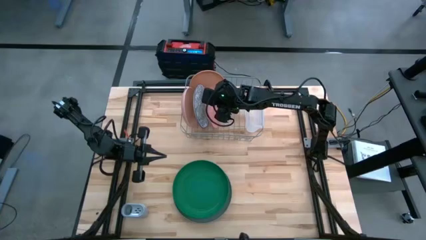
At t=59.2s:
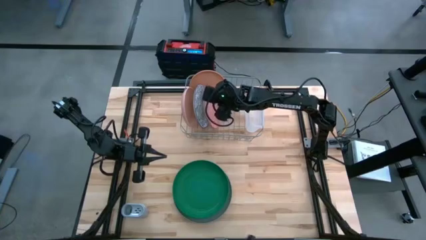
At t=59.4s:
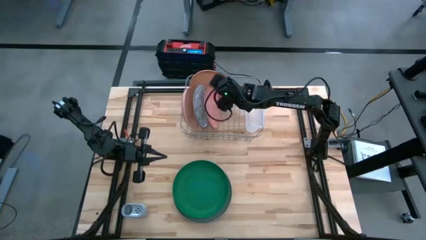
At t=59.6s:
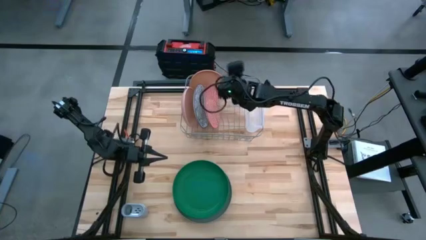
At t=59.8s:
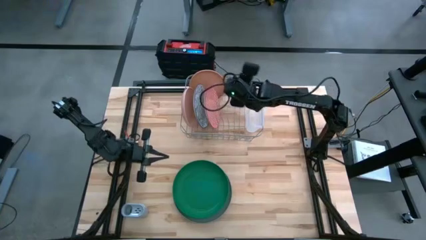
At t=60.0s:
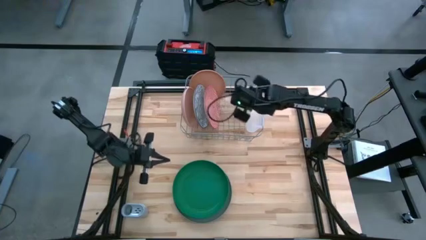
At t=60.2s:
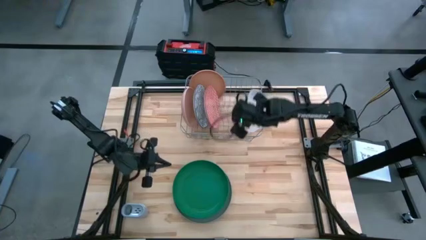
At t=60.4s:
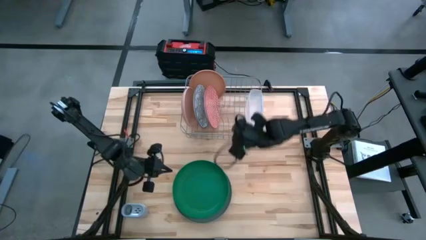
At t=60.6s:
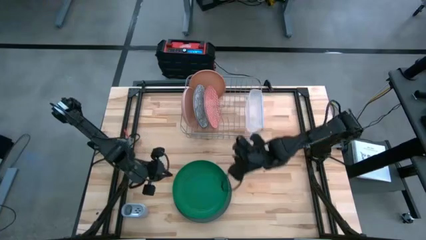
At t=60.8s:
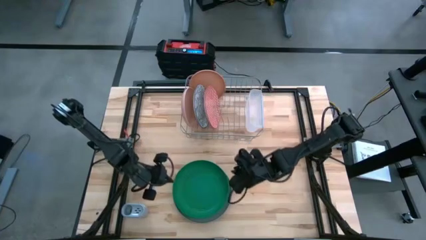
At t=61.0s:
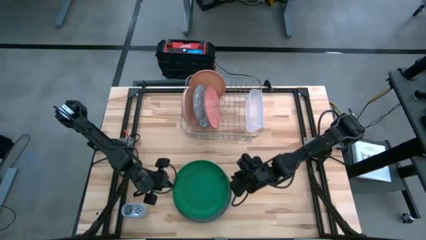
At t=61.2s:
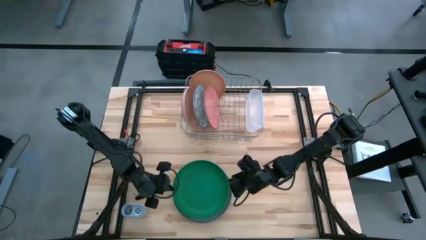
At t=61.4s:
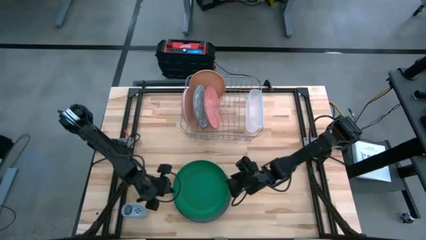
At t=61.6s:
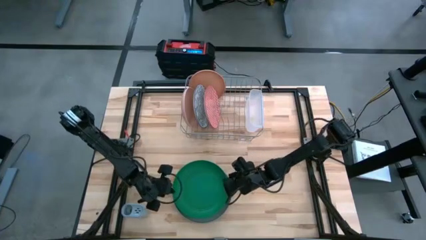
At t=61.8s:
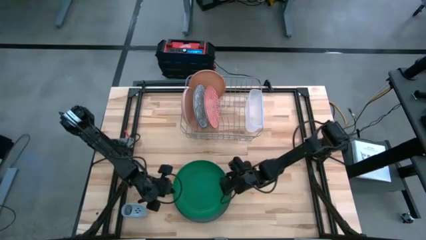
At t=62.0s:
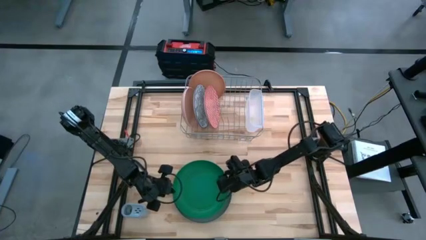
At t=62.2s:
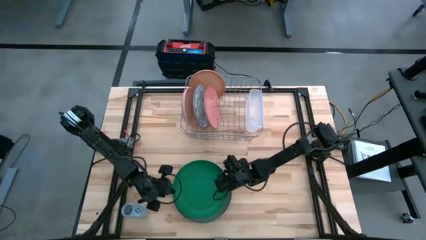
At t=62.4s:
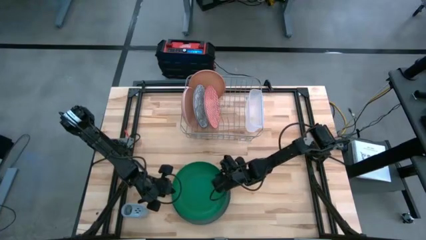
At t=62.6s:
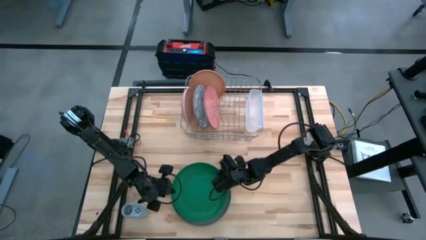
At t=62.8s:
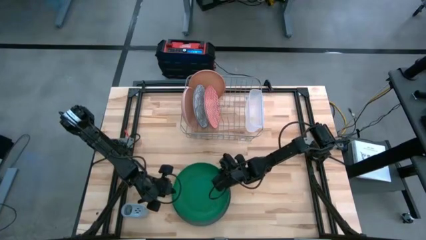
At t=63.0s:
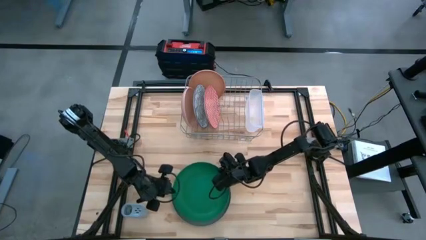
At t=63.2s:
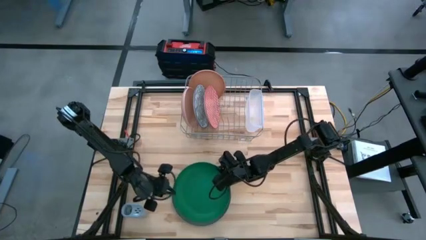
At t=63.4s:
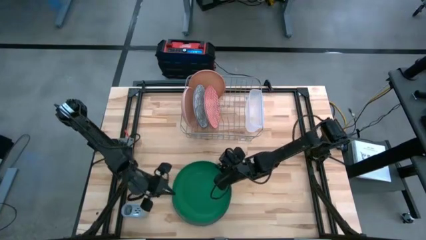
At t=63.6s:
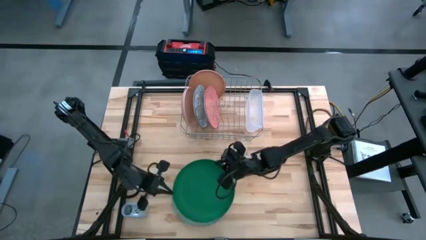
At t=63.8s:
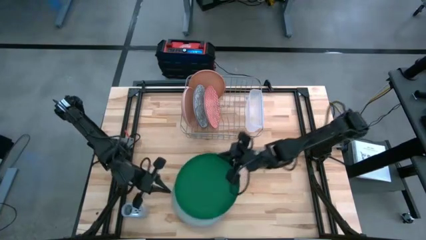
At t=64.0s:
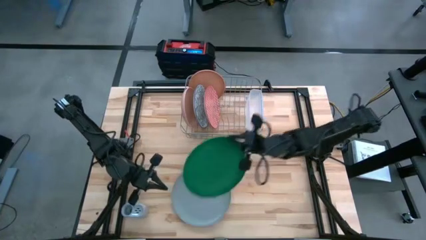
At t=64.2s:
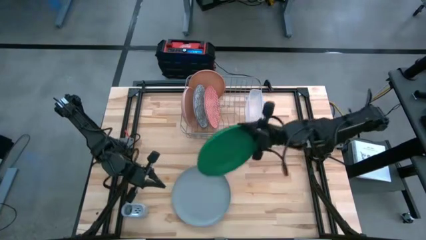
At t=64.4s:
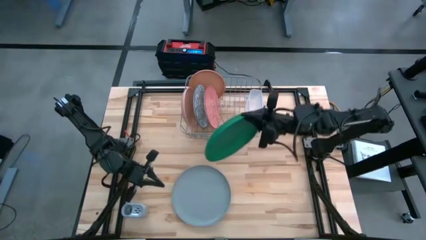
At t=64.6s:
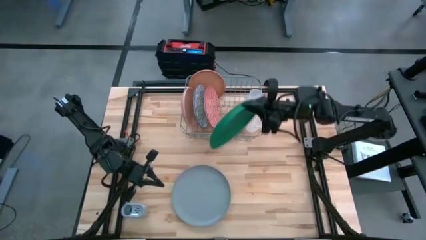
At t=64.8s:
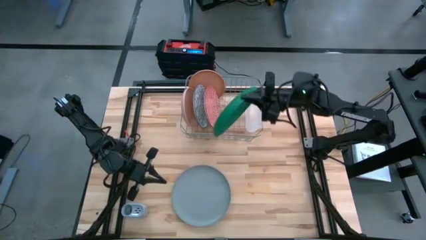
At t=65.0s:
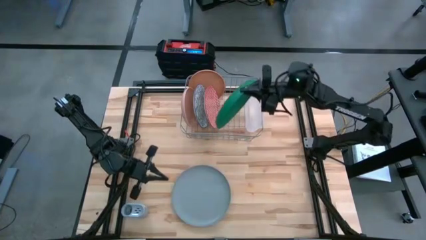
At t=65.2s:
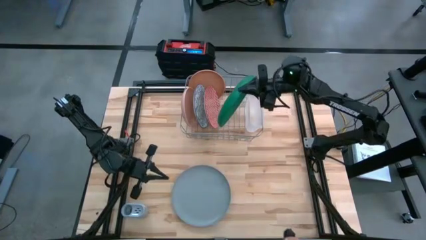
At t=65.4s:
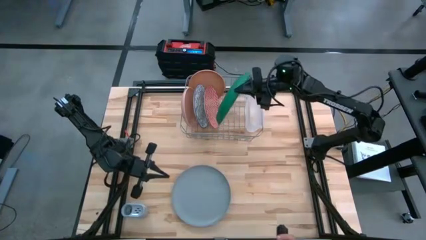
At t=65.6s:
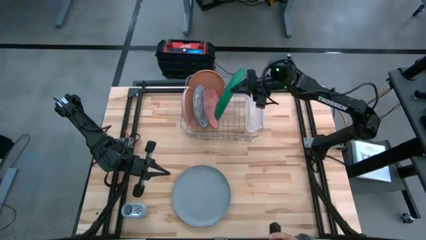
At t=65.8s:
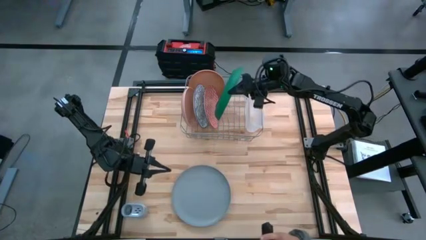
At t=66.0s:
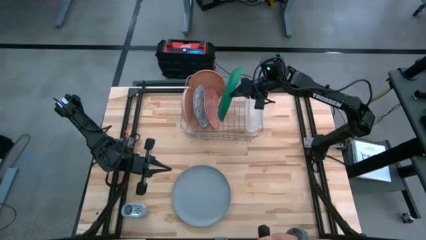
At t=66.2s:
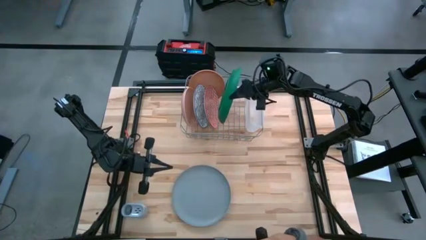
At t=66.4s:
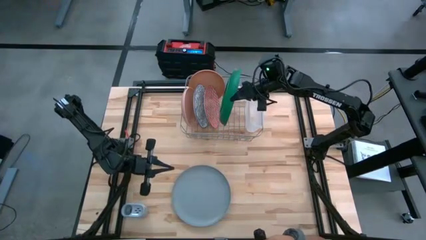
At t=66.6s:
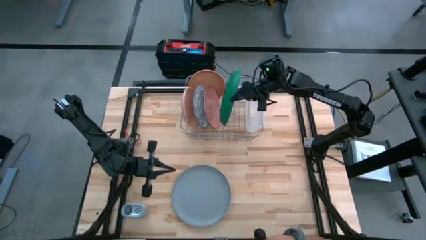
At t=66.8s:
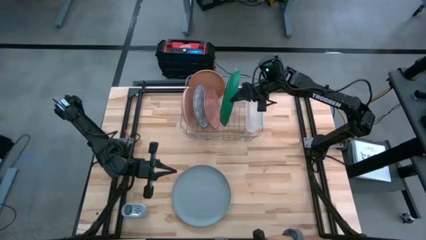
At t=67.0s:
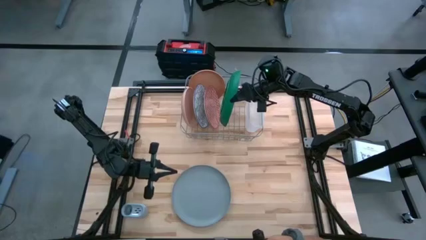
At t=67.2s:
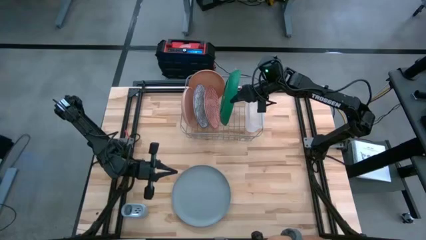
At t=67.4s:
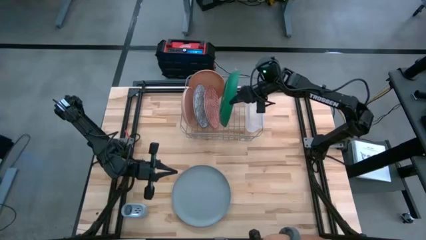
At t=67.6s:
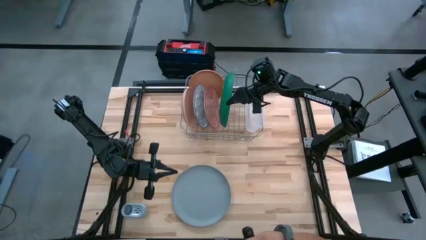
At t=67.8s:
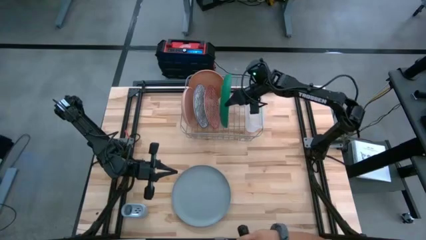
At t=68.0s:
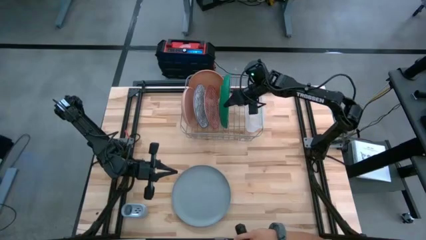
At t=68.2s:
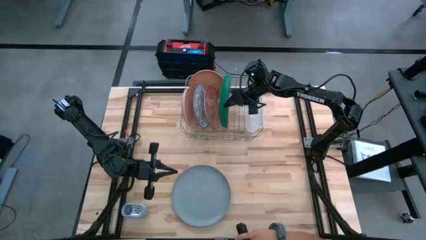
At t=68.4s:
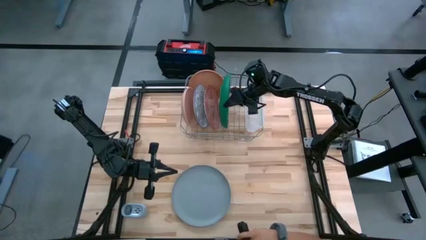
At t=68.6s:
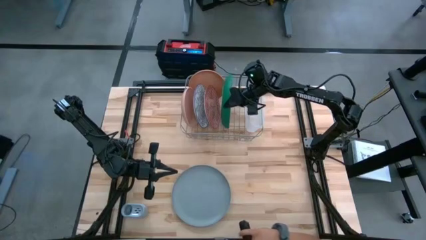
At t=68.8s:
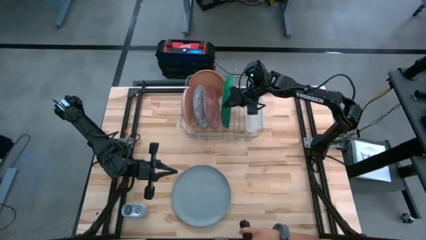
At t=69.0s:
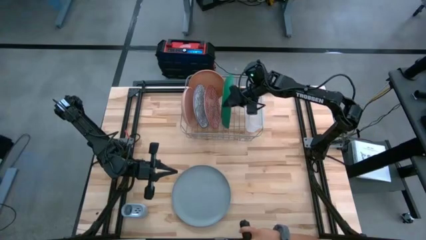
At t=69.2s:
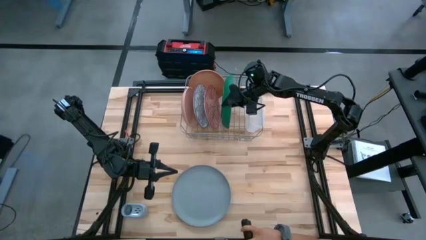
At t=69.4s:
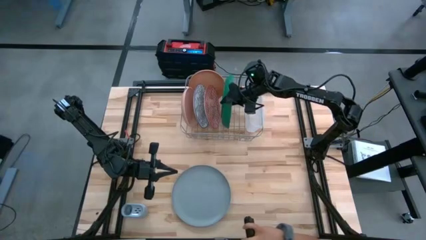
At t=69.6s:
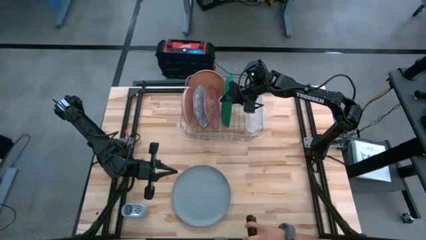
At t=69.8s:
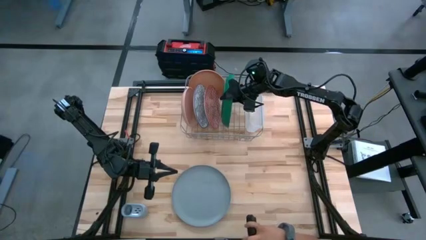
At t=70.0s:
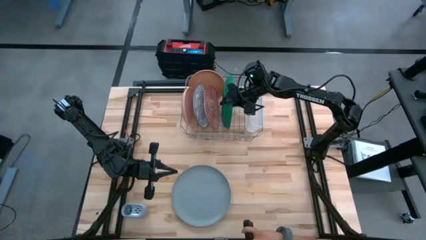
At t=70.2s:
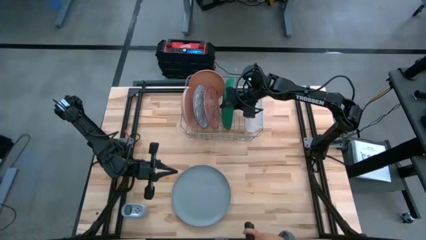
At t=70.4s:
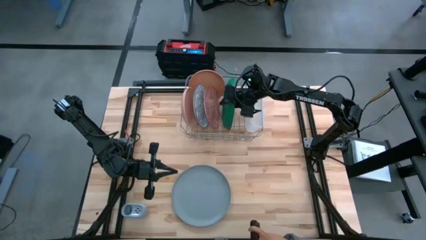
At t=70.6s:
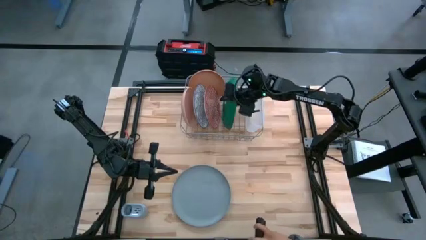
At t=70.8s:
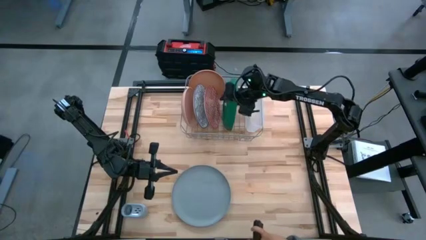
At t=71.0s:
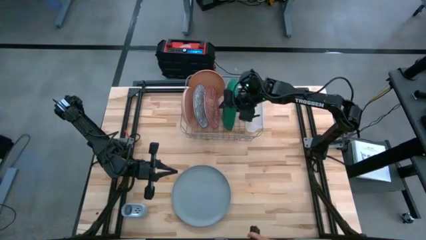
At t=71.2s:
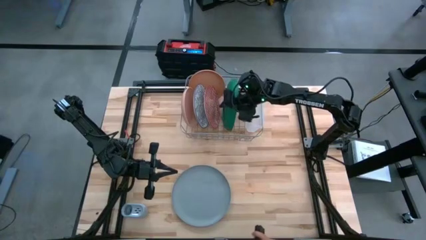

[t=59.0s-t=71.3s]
Task: Sort dishes
Put the green plate in the dish rack

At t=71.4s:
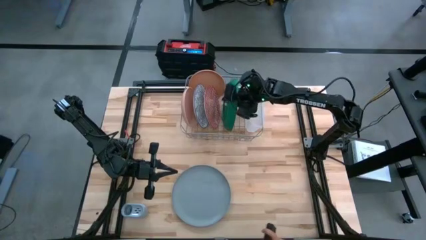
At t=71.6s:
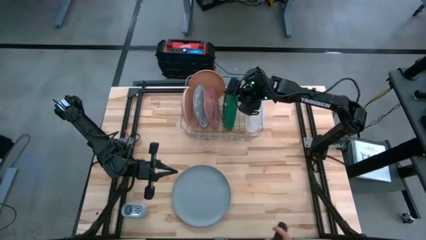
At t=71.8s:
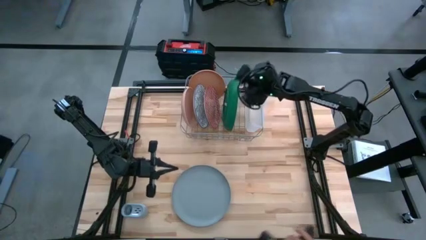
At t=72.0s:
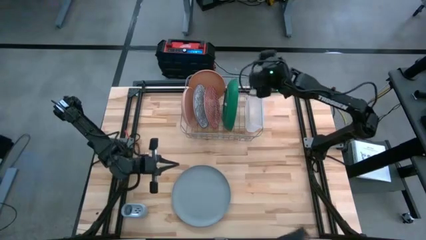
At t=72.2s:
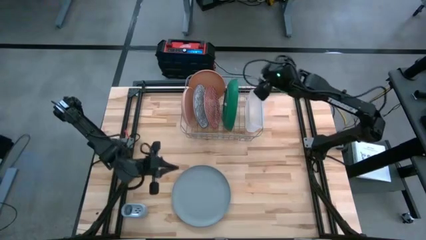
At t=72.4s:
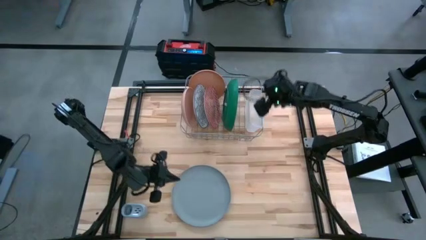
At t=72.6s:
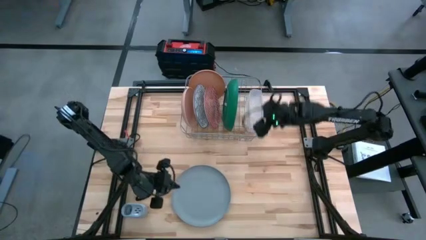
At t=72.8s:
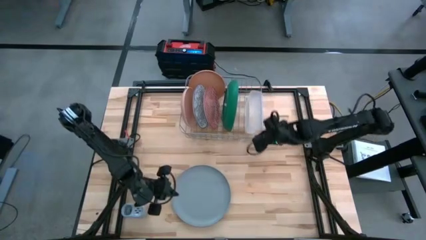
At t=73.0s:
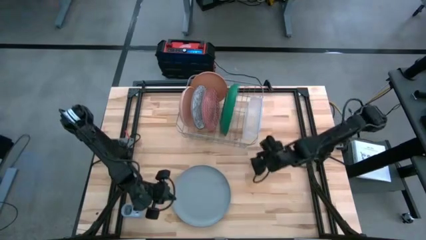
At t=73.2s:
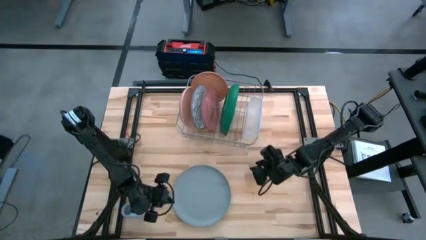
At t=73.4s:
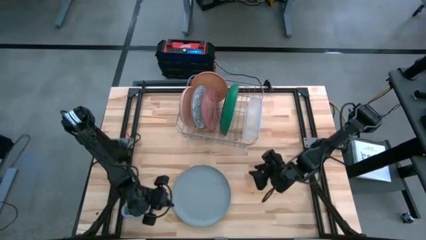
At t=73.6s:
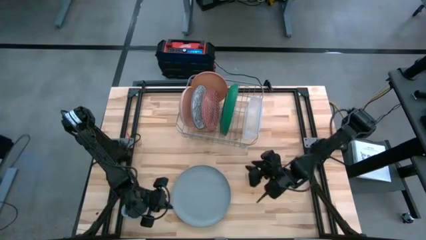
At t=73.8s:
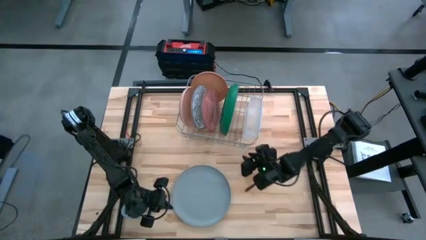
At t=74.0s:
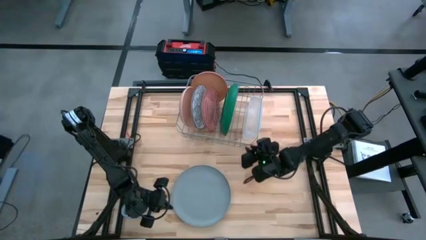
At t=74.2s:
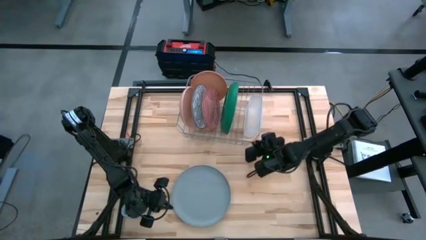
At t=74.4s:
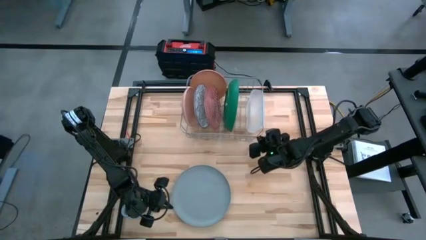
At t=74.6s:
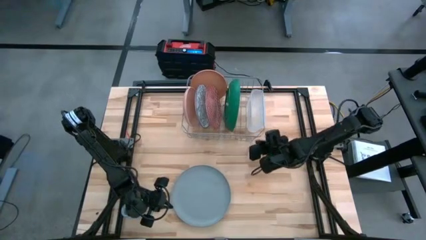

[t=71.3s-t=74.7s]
Adjust the Dish rack

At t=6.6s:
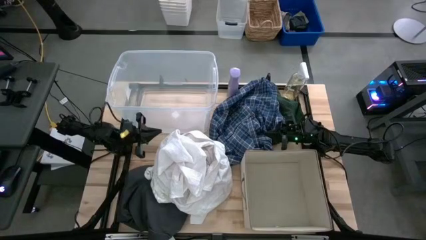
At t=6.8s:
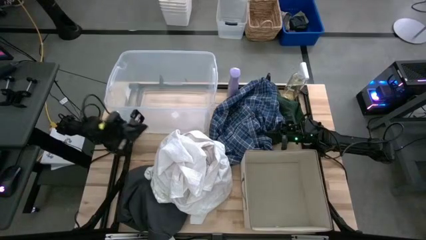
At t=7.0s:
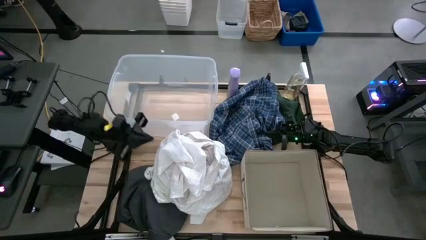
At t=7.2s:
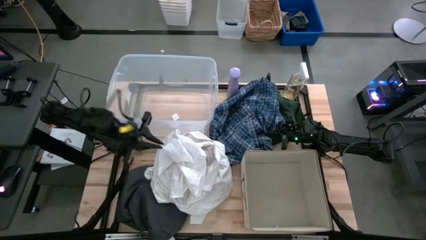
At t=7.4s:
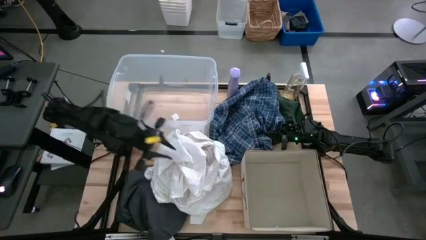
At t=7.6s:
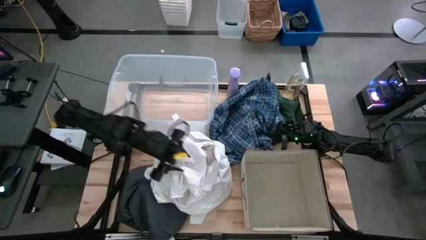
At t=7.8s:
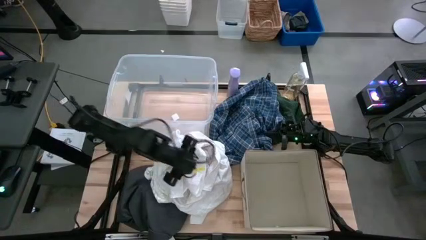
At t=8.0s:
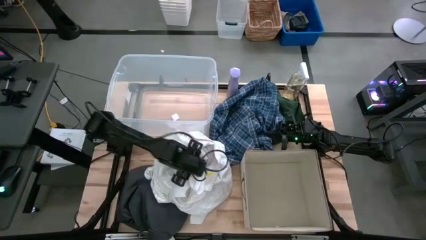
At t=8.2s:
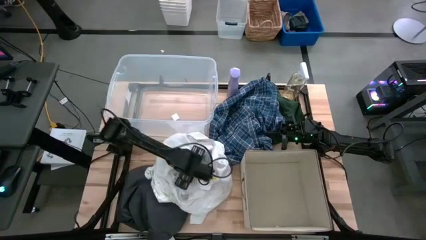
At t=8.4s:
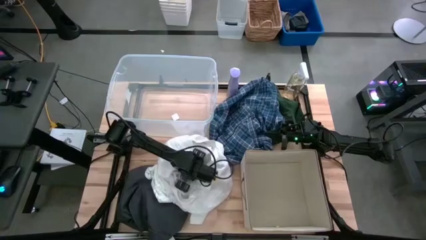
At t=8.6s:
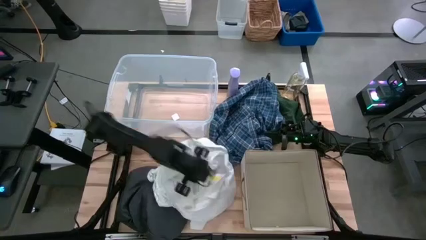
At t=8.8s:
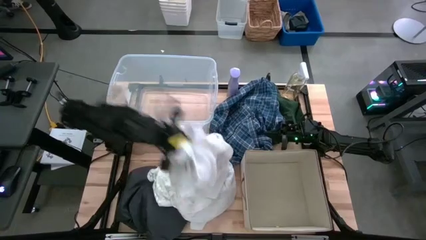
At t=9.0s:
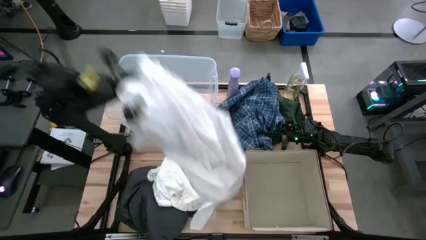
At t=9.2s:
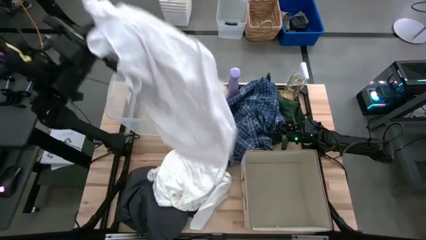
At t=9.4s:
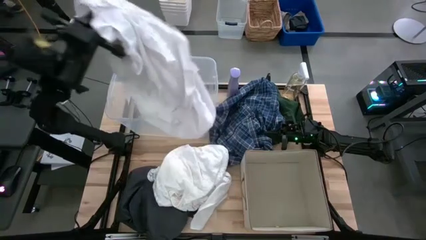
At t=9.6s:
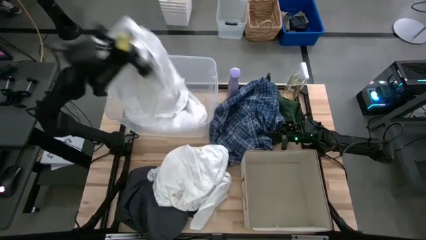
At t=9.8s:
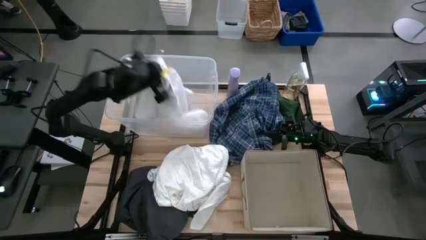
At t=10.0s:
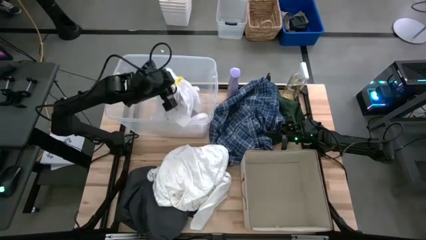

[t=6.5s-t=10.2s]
Task: Sort clothes
Put the white polo shirt into the transparent bin
